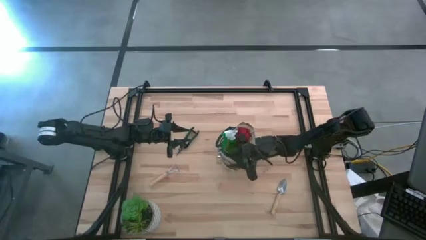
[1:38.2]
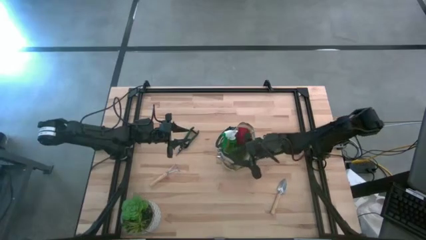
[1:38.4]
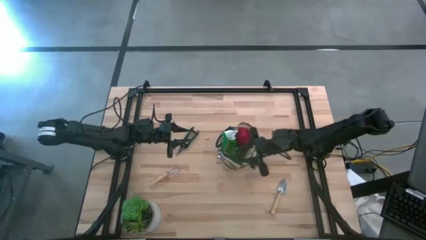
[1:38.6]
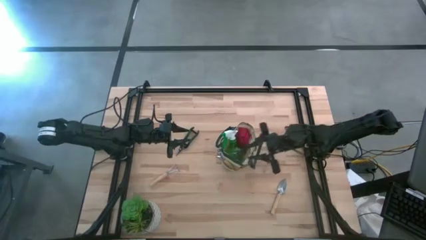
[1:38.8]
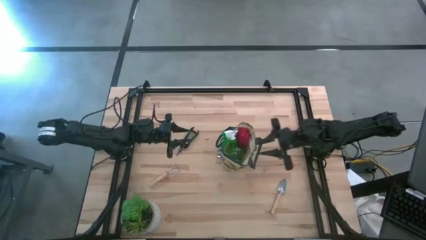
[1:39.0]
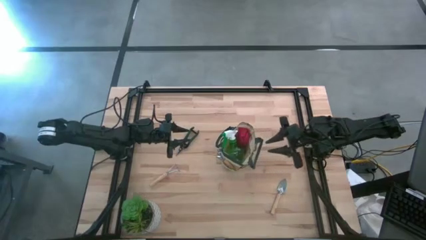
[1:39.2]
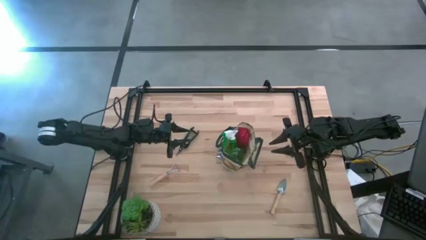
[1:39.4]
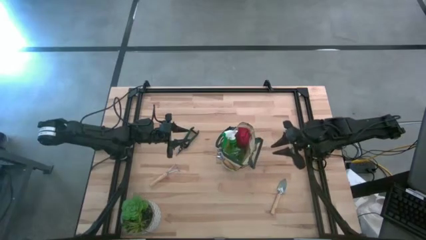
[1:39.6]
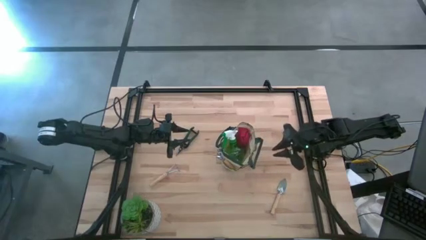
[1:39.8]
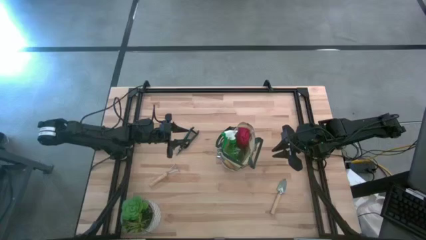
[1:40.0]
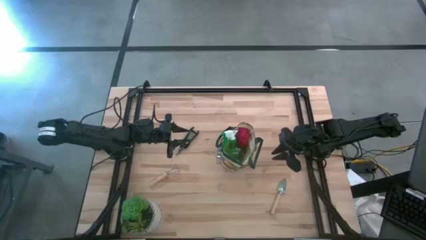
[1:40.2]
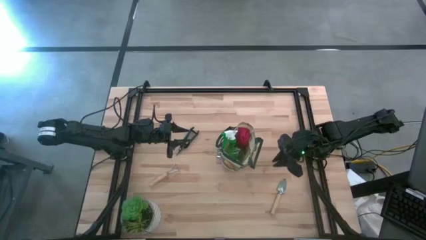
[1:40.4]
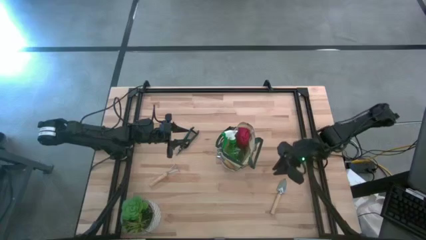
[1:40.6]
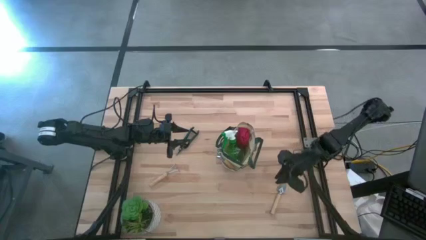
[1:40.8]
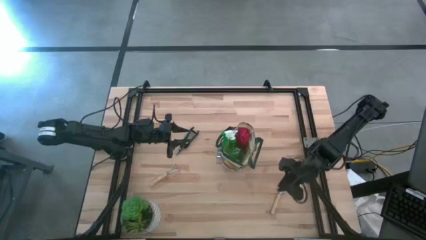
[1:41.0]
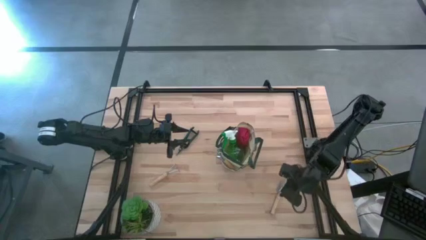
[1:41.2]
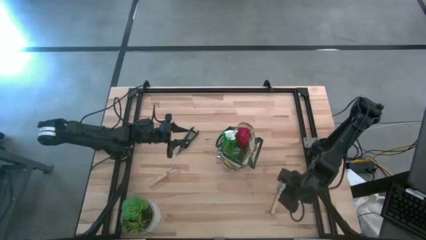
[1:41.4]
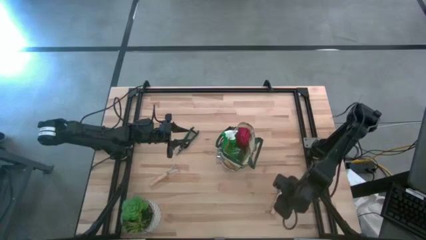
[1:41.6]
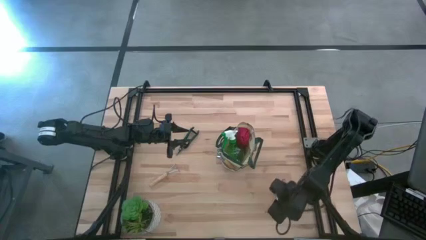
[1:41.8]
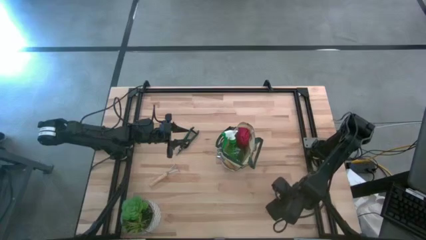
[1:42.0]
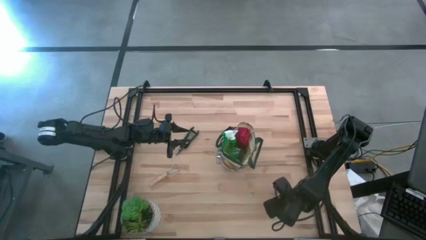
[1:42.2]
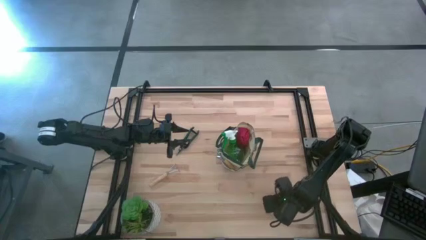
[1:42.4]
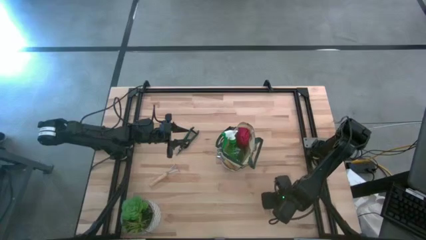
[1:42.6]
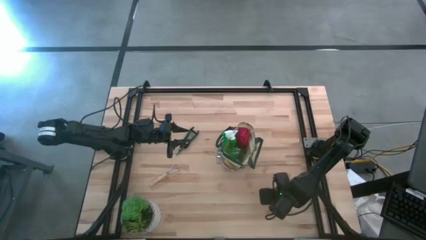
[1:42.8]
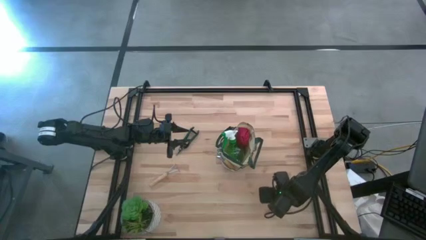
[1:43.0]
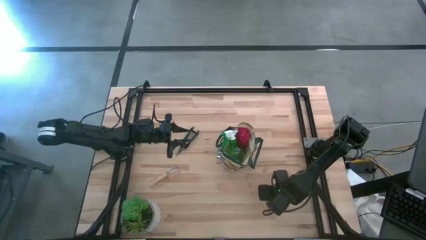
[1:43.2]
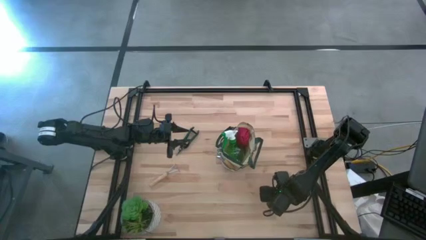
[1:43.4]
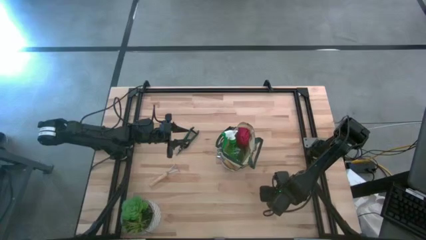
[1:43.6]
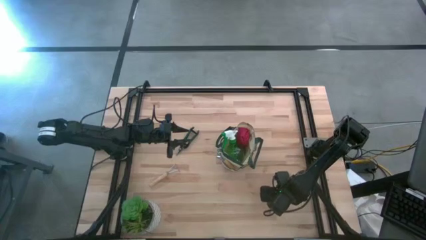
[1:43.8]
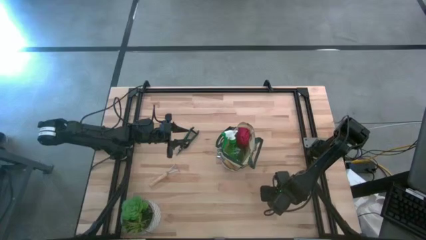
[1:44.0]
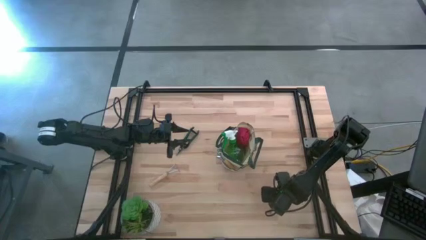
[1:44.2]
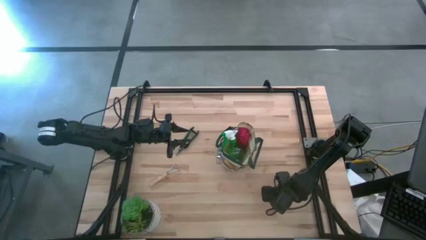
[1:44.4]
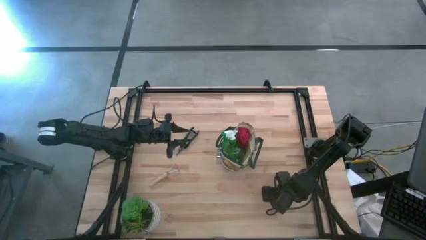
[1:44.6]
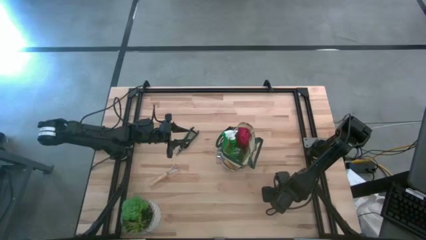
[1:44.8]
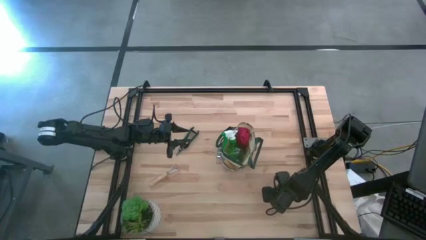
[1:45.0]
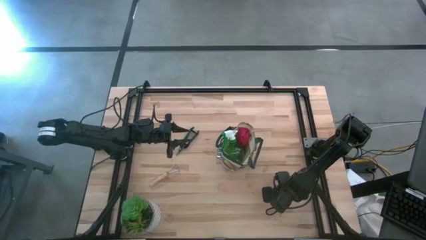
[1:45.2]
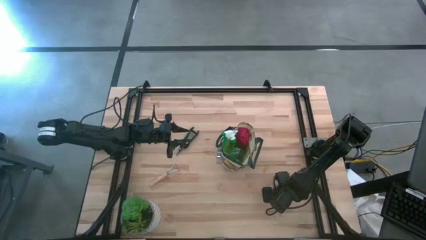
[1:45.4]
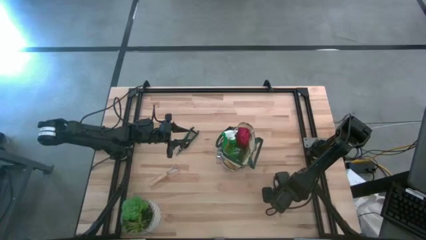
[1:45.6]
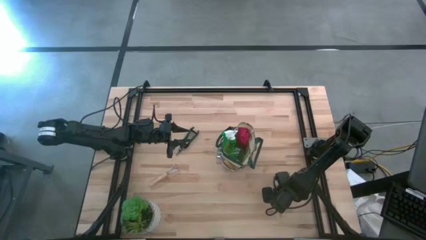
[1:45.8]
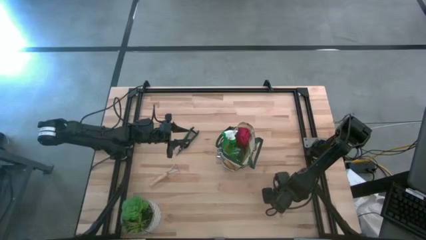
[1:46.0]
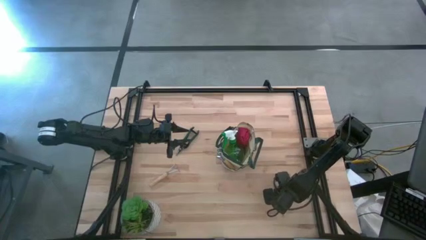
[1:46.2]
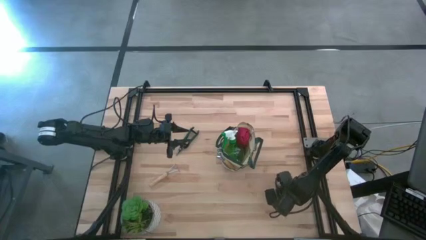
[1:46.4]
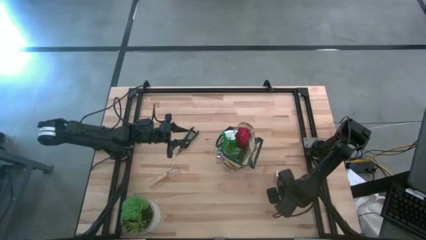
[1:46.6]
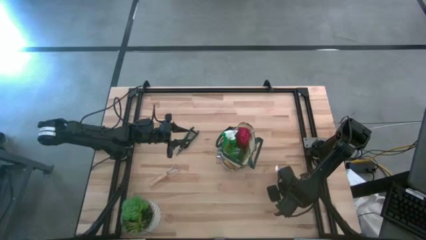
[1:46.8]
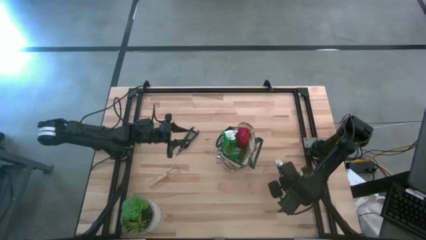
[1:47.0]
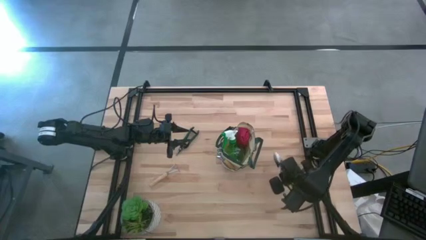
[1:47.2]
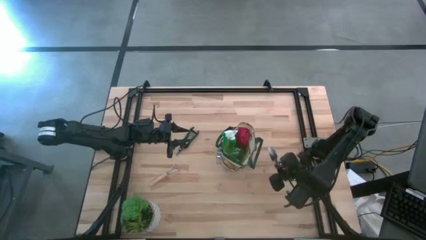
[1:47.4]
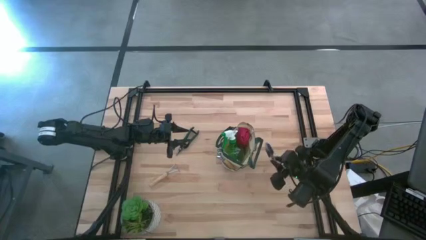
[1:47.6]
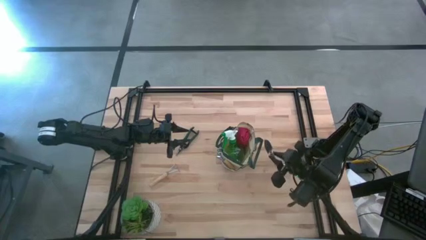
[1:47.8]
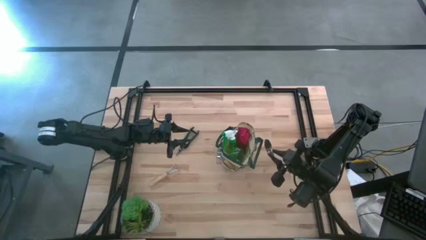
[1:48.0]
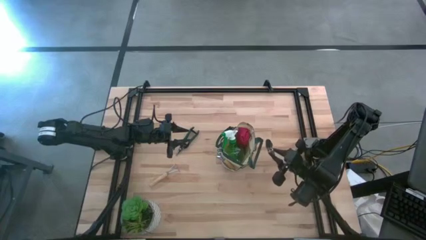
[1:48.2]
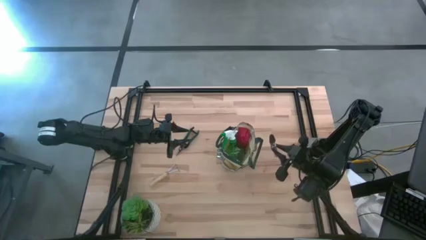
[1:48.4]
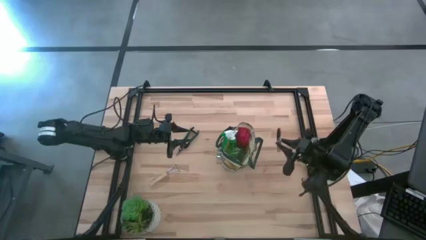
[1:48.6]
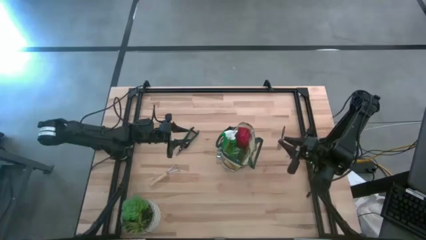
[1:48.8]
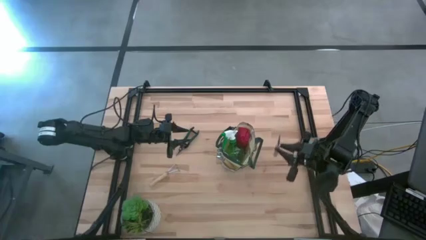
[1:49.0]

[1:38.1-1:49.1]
Task: Pick & Place Garden tools in Gardening bag
Put the hand trowel into the pocket of the gardening bag

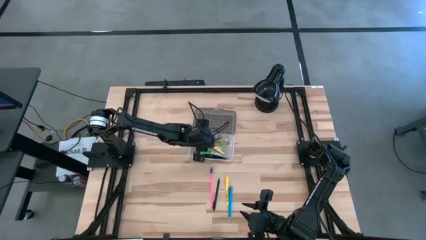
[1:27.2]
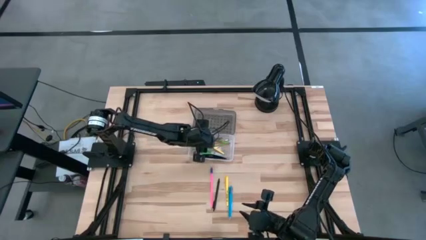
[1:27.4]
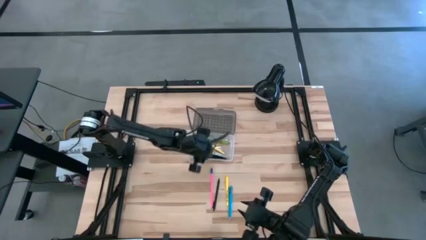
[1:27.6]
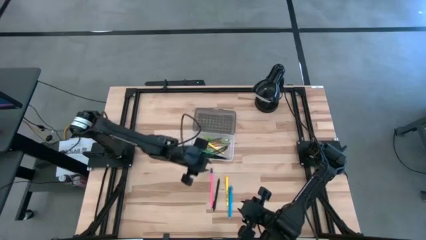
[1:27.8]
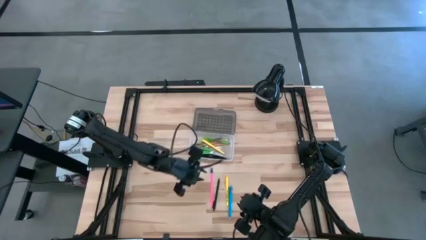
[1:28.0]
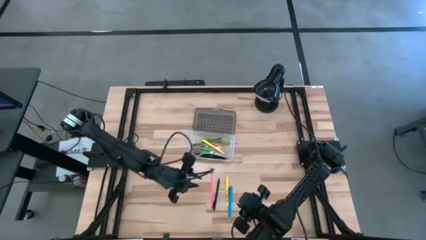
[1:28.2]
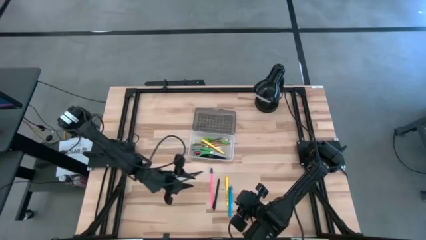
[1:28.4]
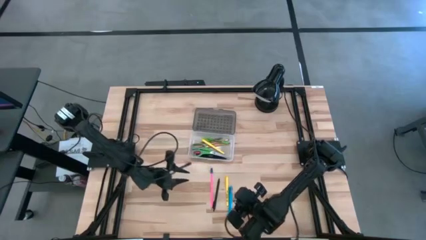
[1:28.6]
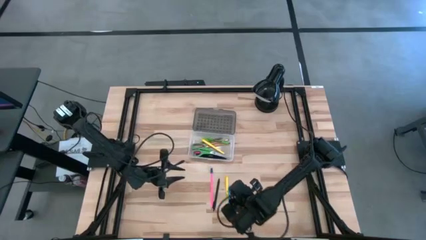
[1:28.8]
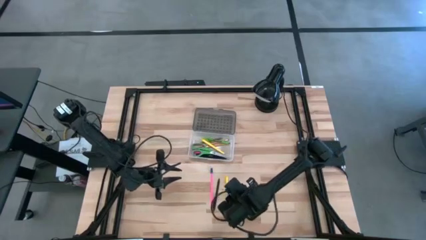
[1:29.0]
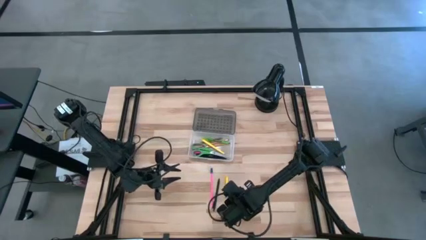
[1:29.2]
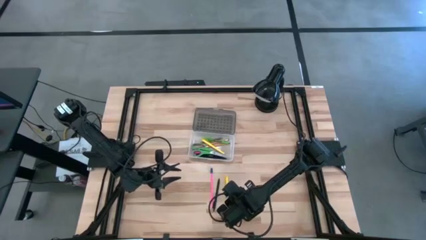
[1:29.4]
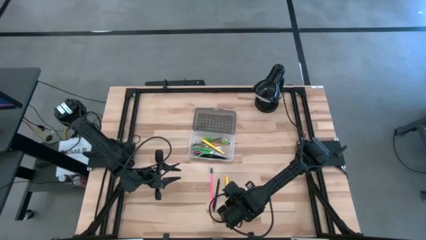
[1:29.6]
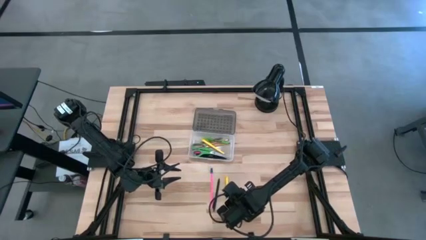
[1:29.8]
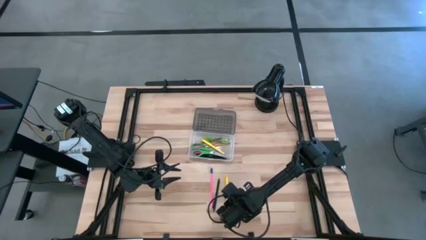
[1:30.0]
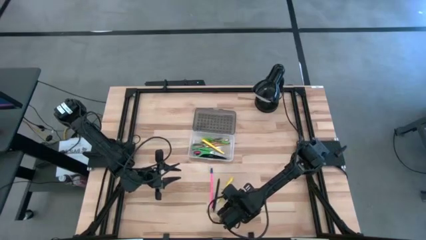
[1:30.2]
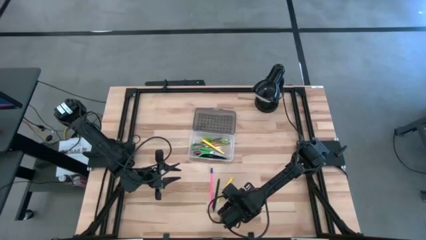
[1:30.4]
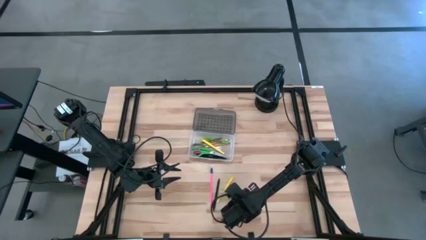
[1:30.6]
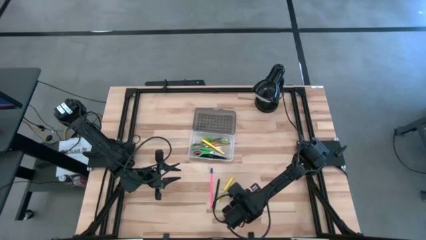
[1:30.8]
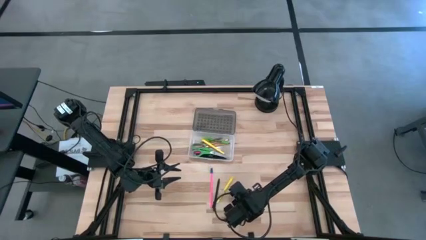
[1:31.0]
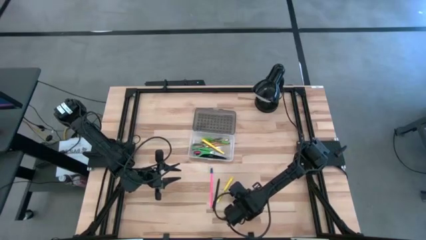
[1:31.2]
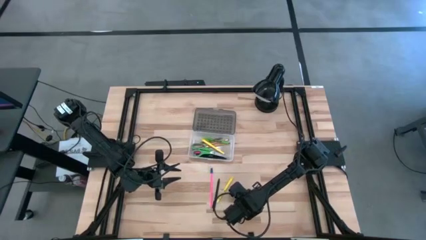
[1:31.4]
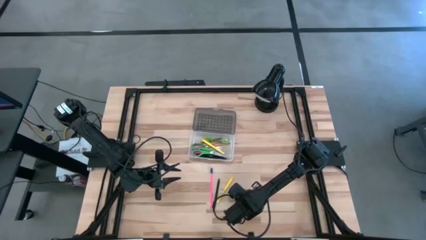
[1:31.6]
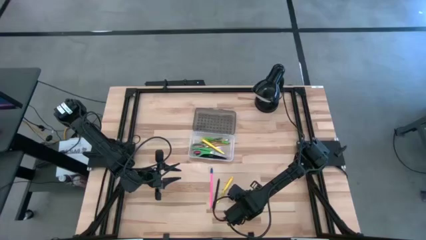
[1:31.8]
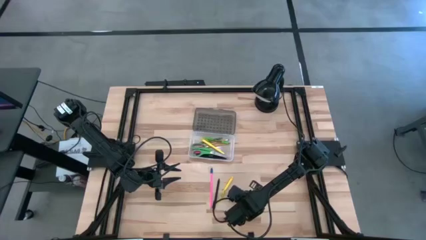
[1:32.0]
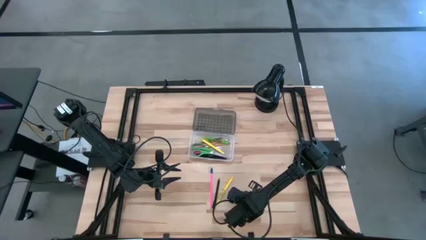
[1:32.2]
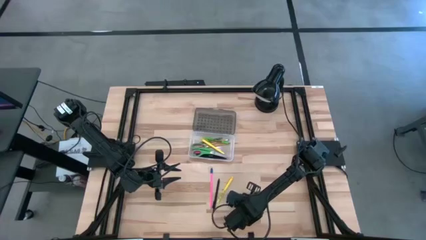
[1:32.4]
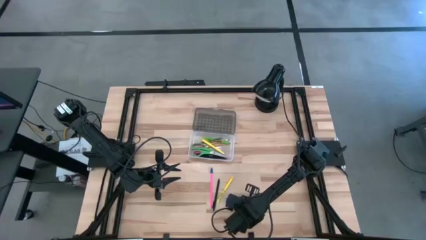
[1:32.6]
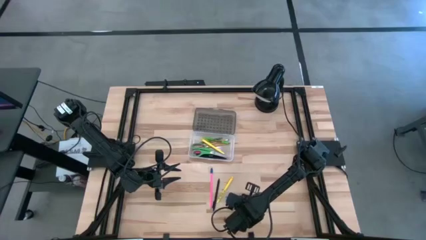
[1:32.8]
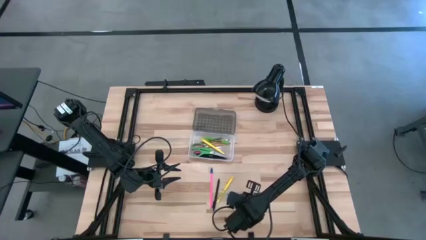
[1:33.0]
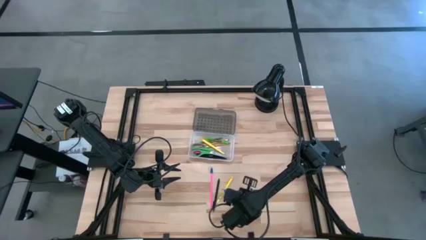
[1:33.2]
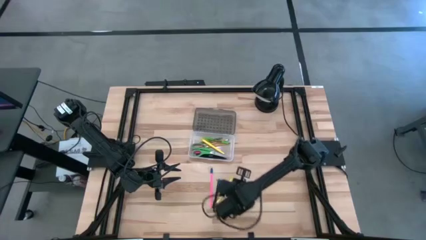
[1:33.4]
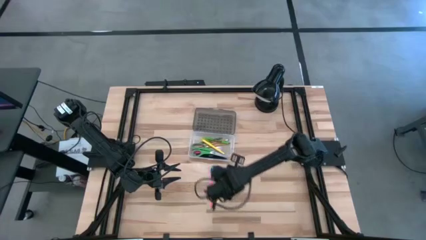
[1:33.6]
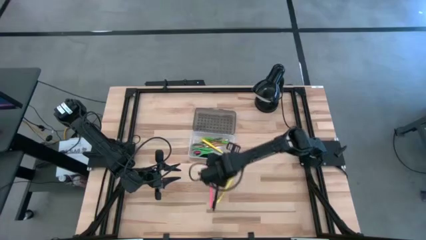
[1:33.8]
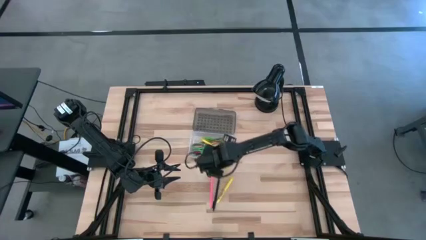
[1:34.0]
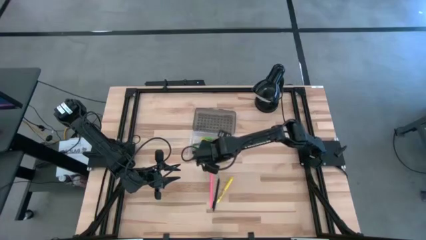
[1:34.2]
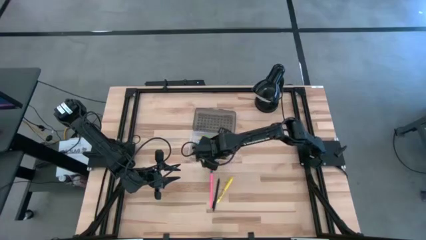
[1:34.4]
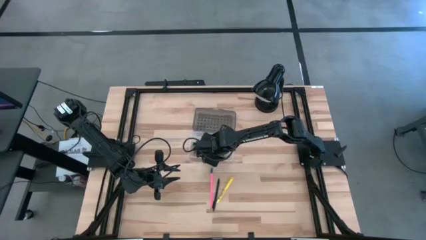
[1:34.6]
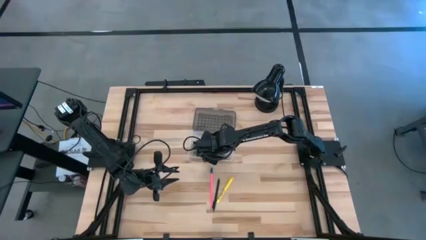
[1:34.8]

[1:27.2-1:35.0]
Task: Pick & place school supplies into a supply box
Put the blue pen into the transparent supply box
